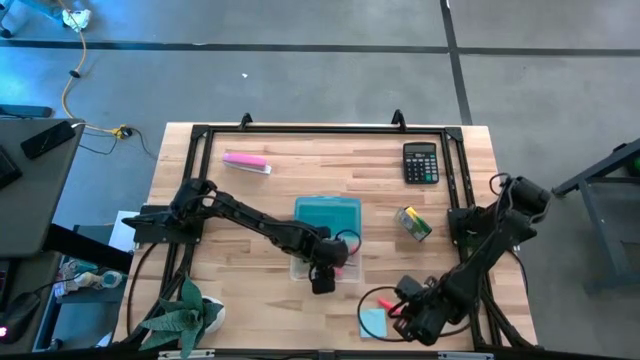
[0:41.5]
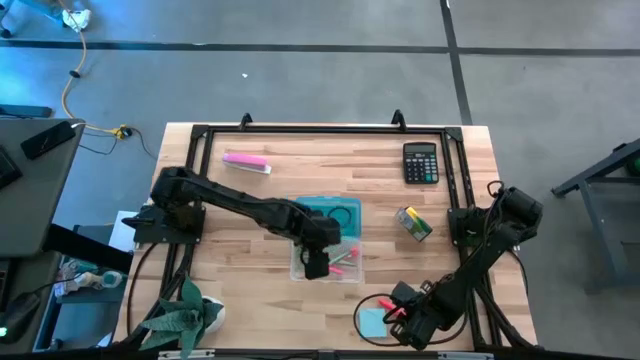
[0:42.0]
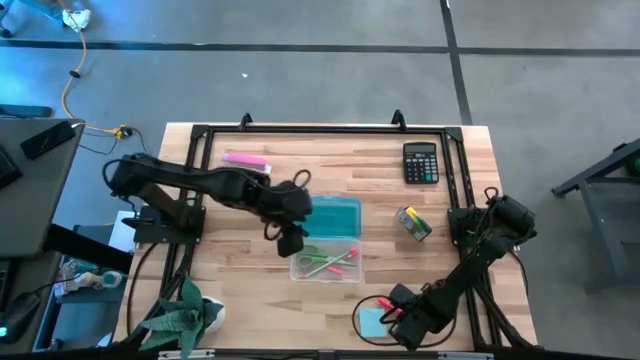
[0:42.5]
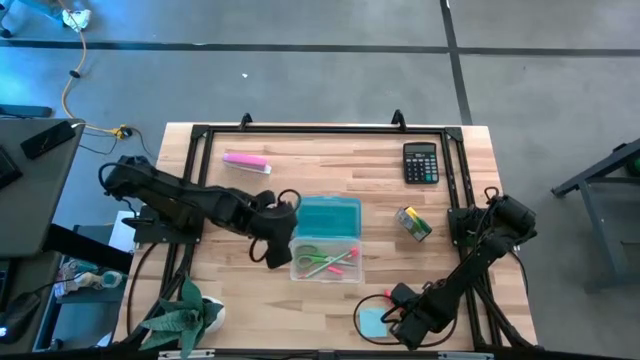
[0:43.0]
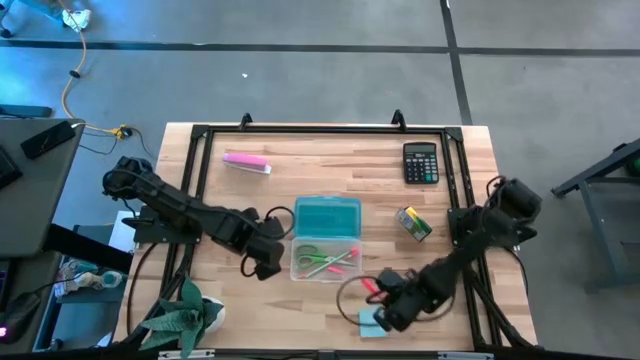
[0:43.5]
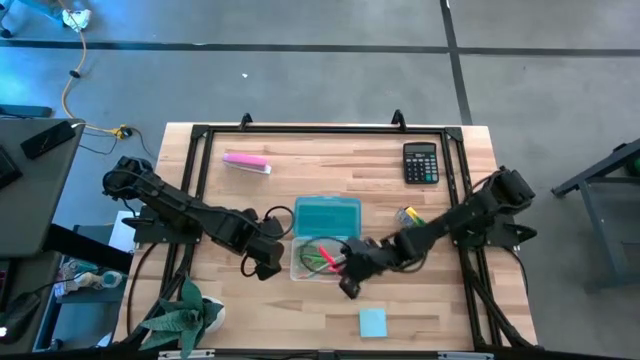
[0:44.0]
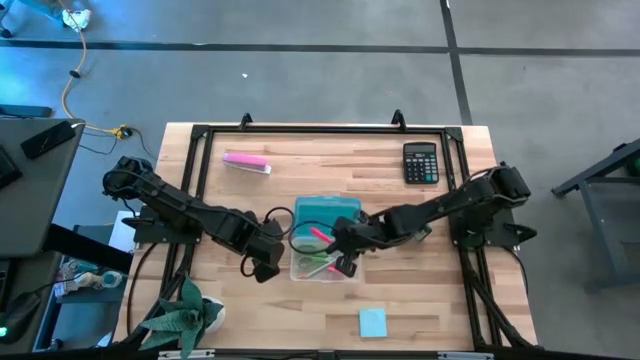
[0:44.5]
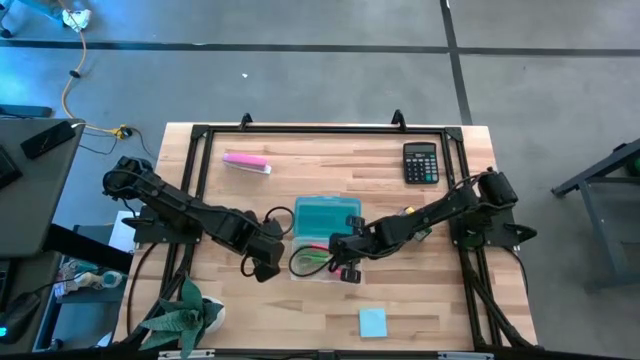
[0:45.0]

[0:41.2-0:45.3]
Task: Pack school essentials
Put the orange pen into the supply box

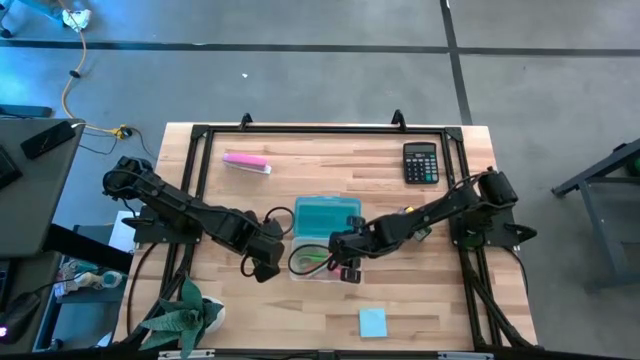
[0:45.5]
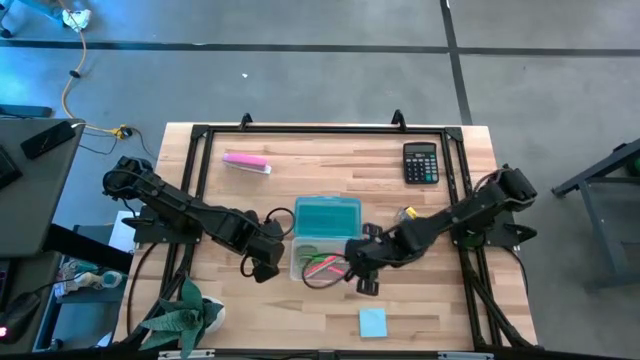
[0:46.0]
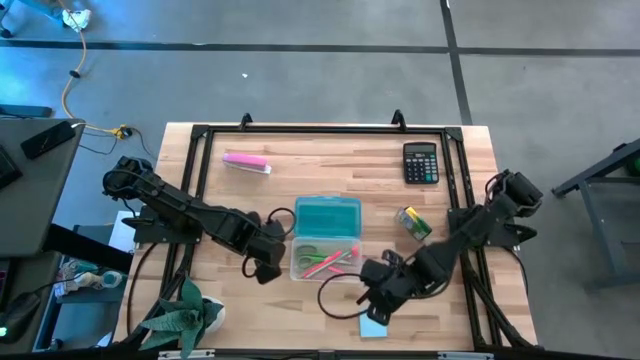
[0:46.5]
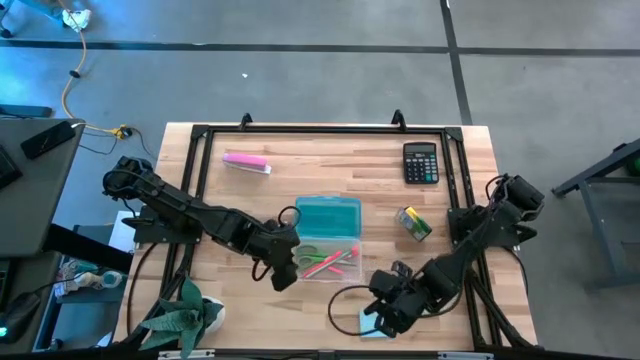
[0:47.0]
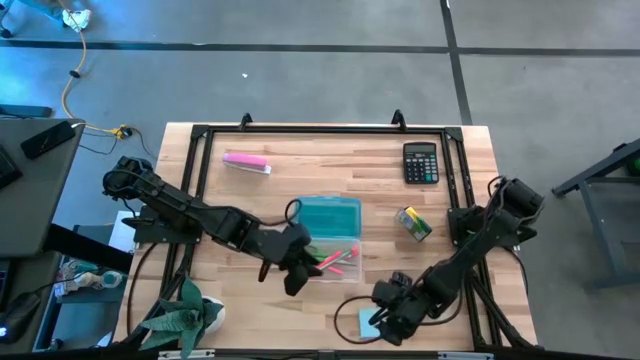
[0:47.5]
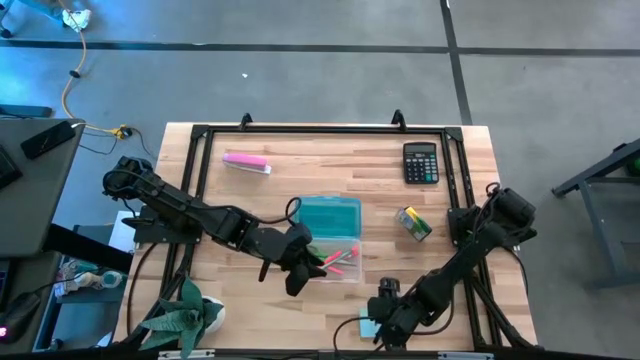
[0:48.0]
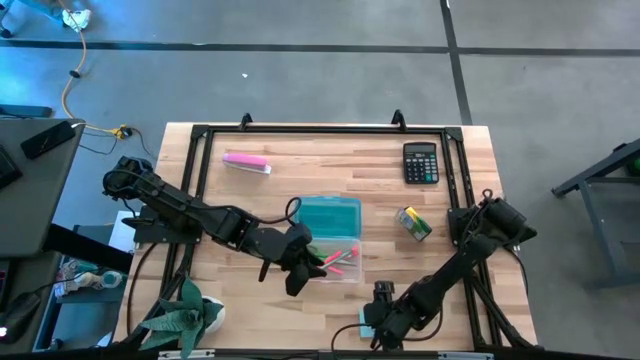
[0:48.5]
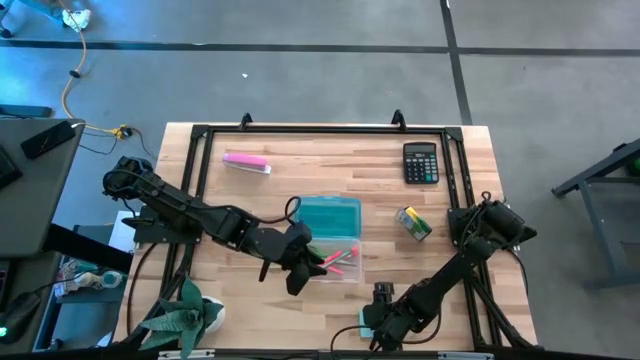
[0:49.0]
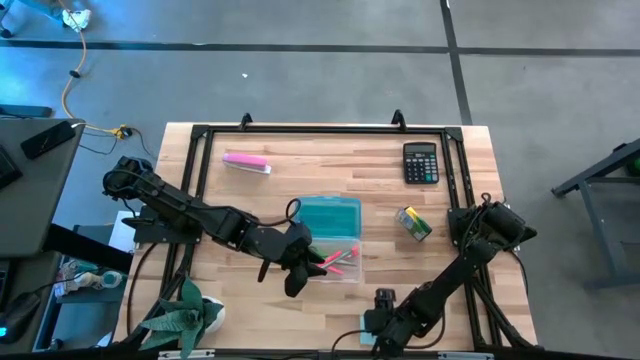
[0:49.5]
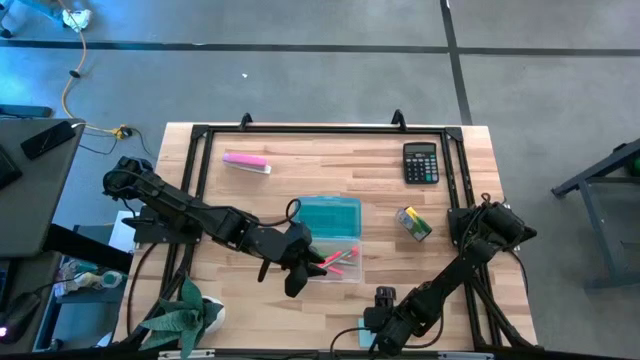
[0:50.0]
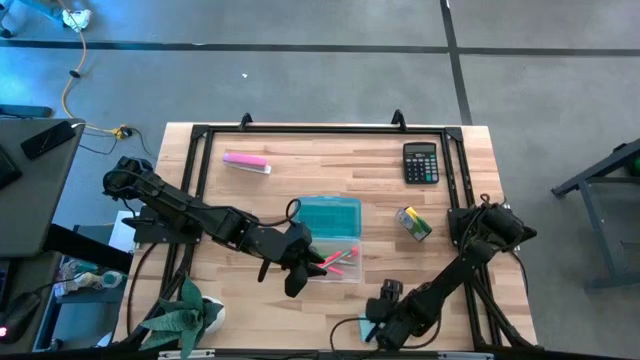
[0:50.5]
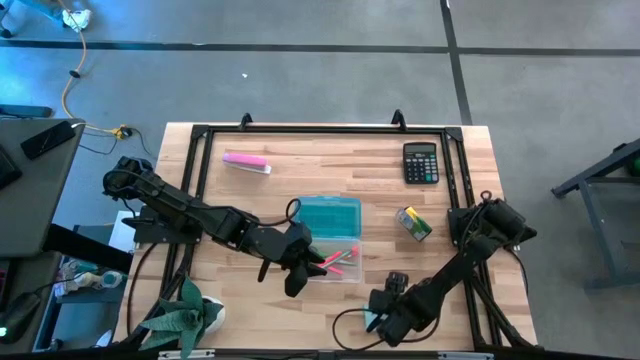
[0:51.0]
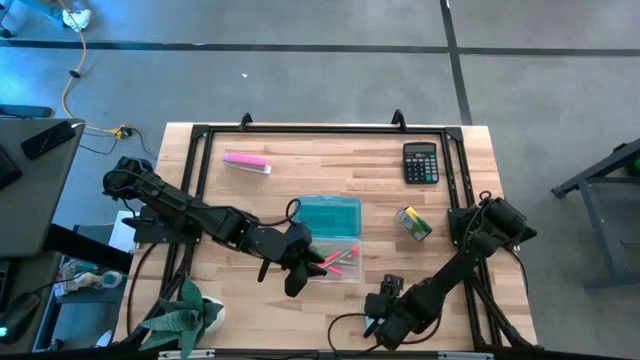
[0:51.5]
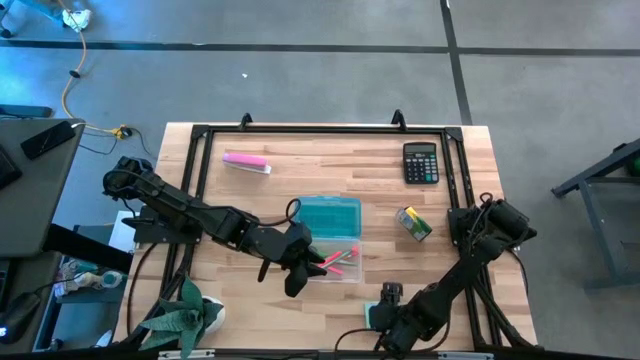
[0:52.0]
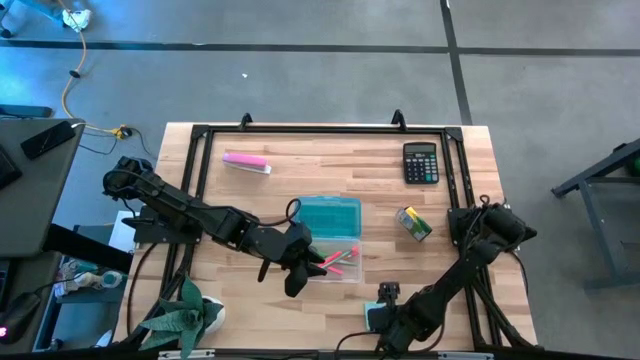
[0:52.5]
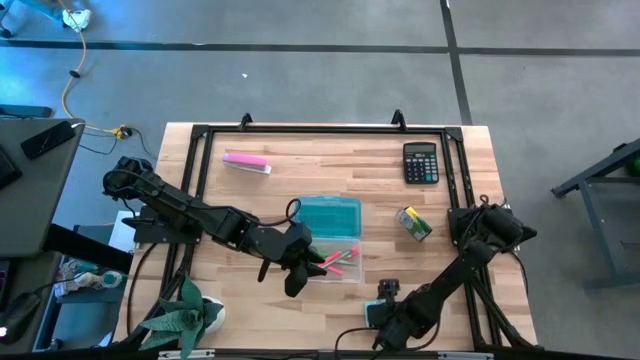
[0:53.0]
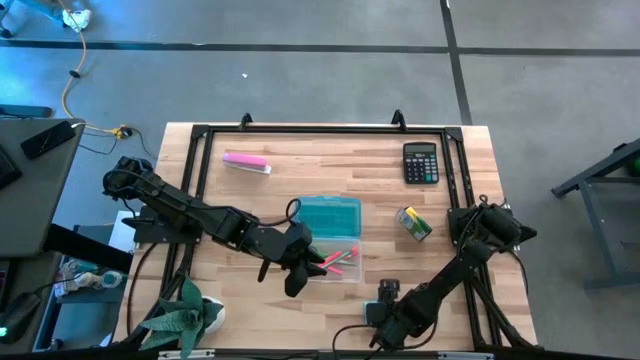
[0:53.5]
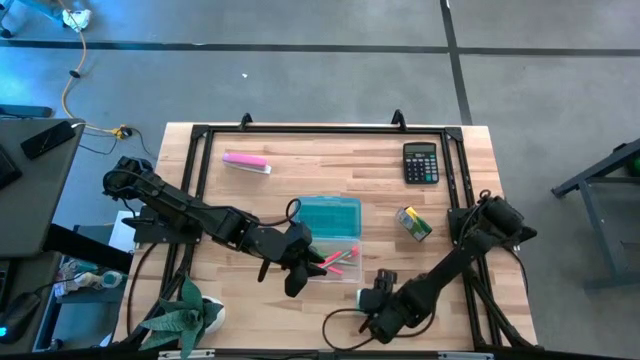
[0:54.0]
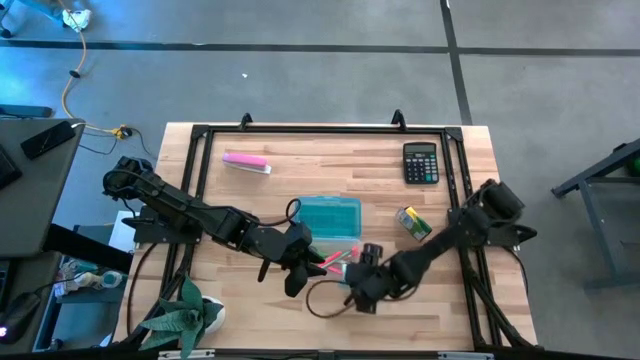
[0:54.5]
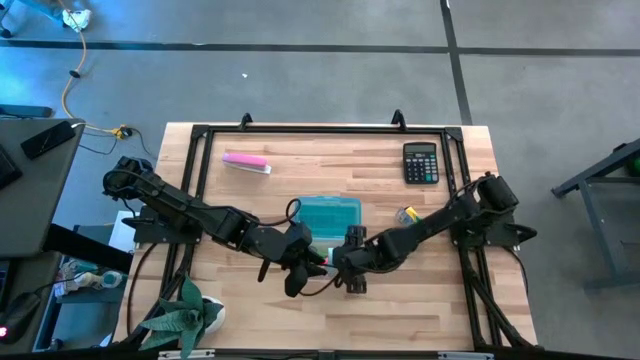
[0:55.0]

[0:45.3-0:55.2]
Put the blue sticky notes into the supply box

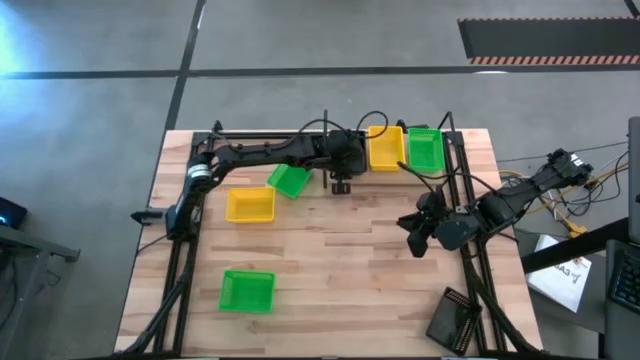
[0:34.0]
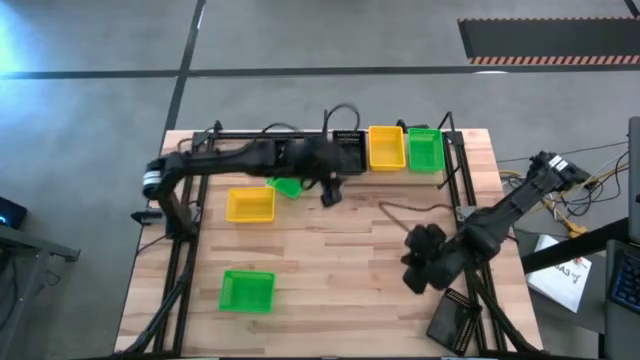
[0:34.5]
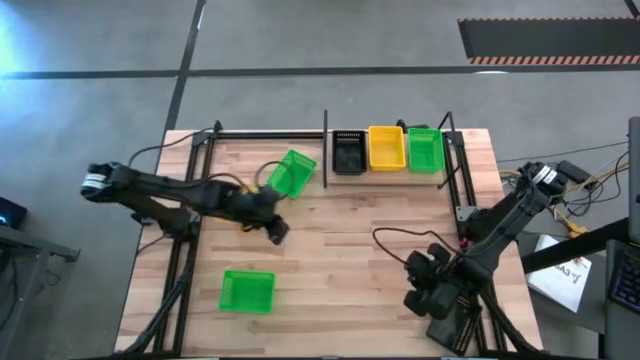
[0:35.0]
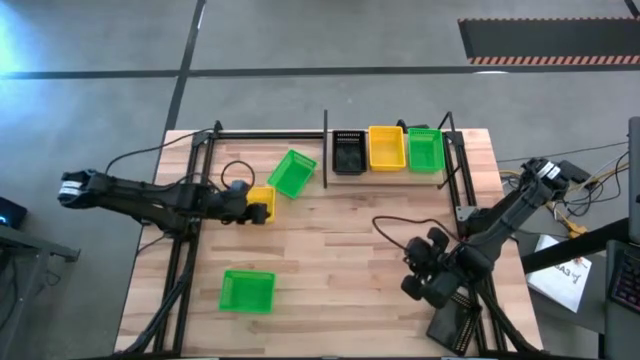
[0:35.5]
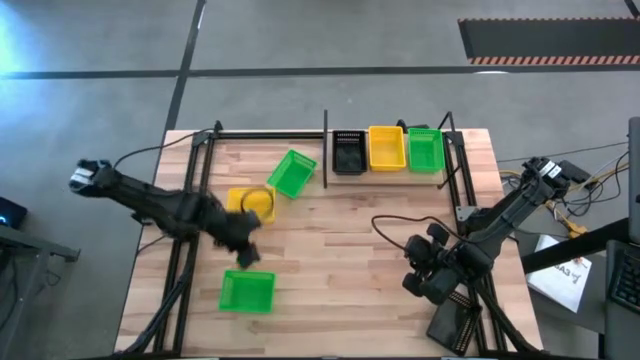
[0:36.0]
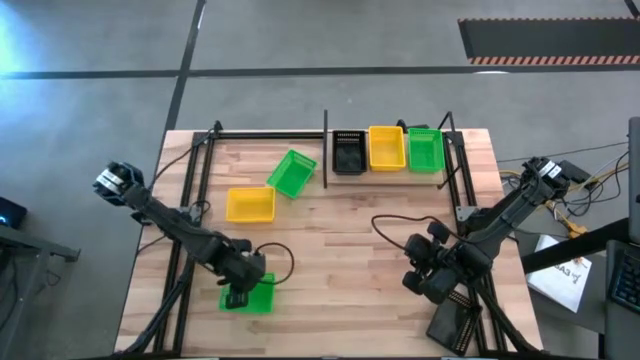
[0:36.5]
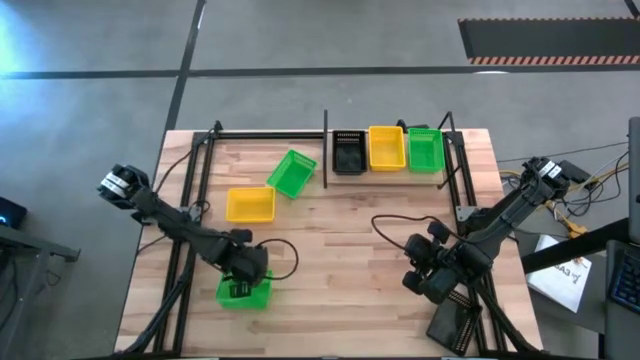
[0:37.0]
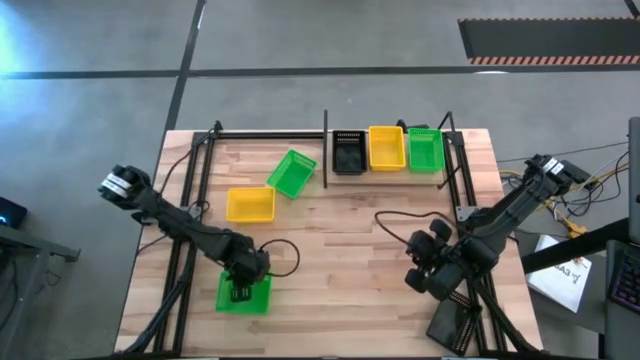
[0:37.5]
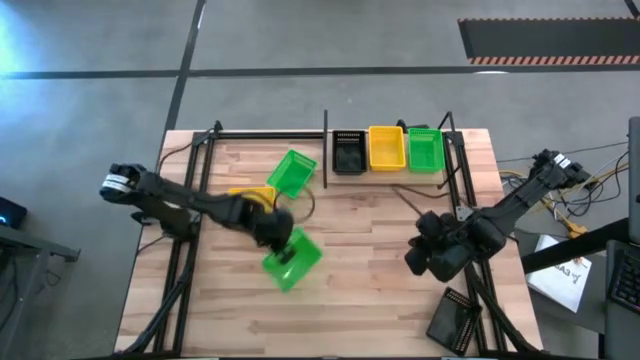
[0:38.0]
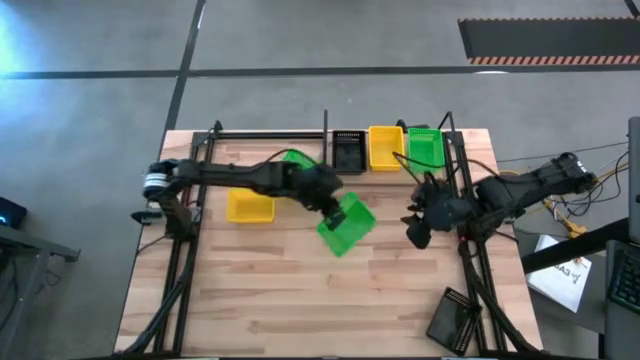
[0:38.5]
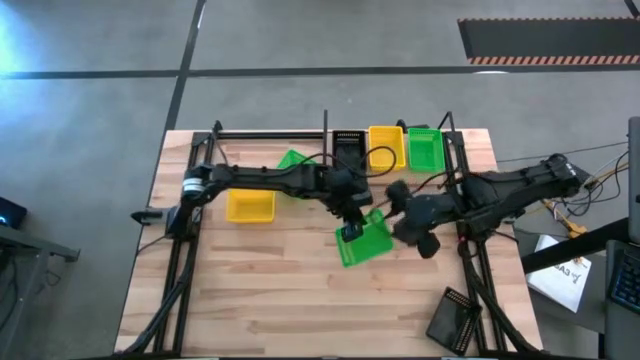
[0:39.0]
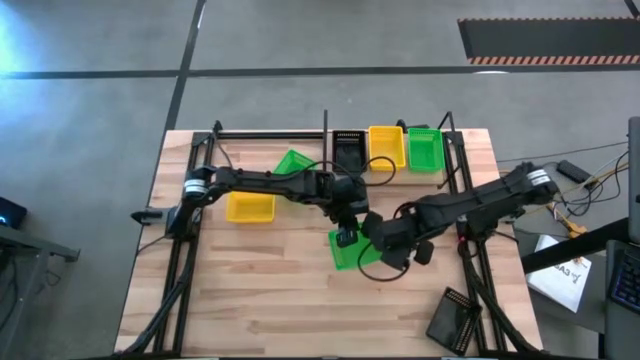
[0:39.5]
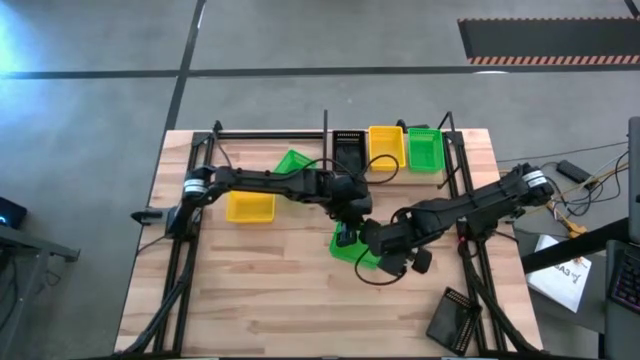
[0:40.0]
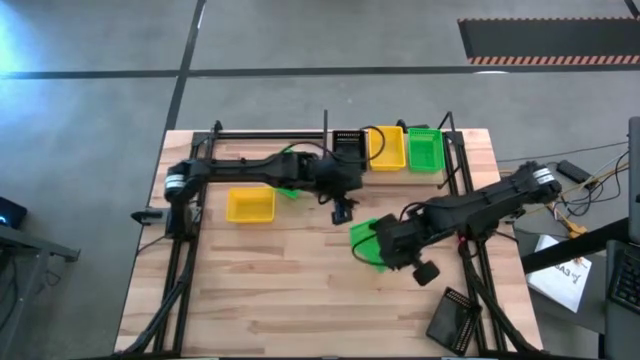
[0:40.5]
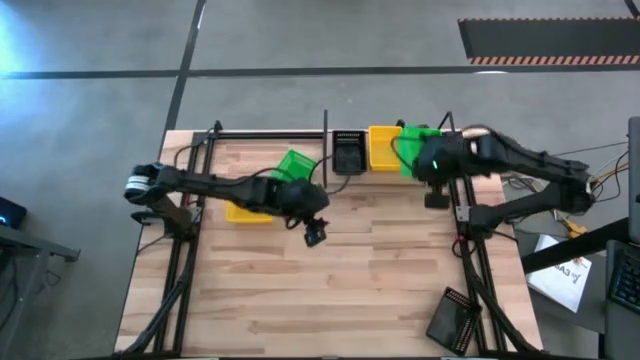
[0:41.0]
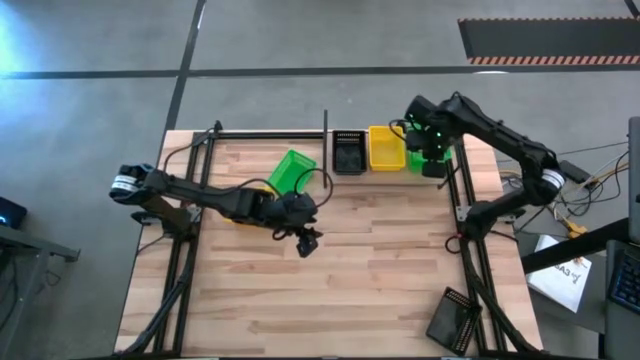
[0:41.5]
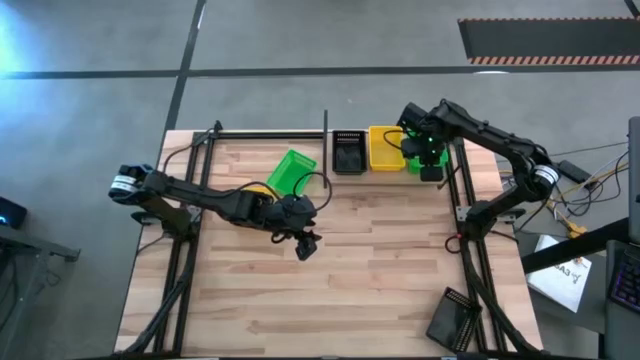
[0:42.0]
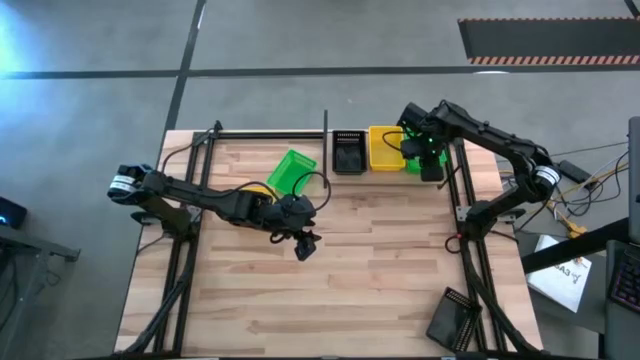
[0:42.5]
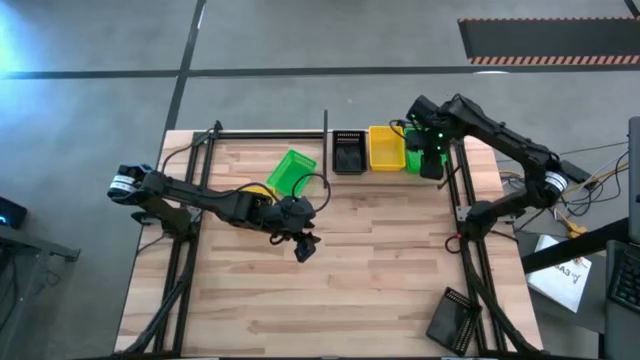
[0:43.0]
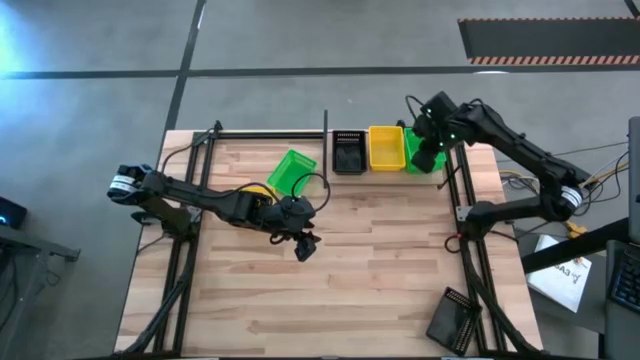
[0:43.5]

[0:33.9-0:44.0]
Task: Stack baskets on shelf by color
Stack the bottom green bin on top of the green bin on the shelf
